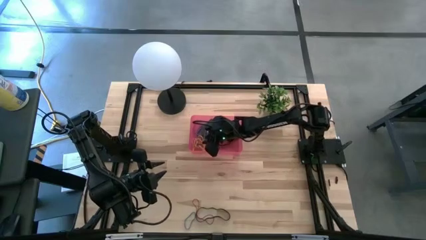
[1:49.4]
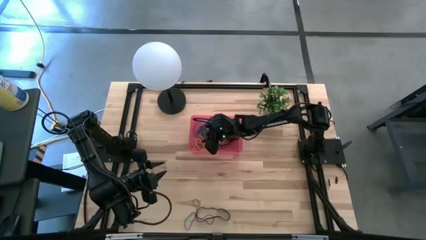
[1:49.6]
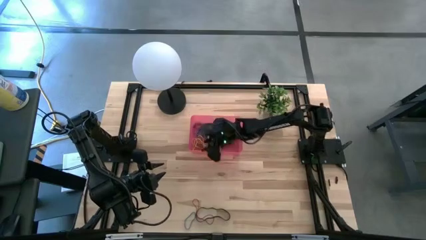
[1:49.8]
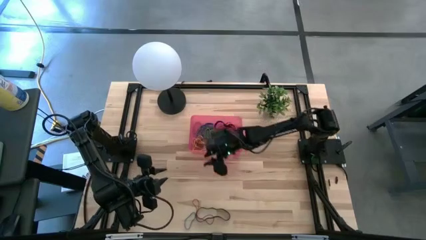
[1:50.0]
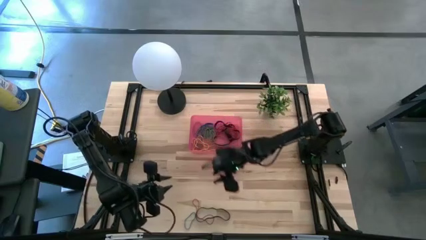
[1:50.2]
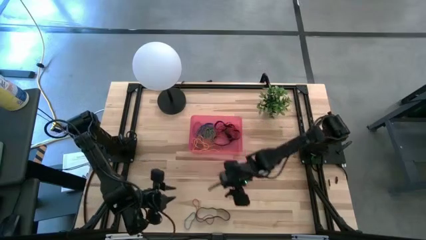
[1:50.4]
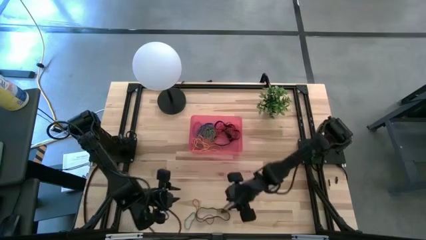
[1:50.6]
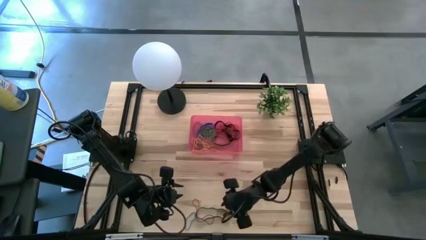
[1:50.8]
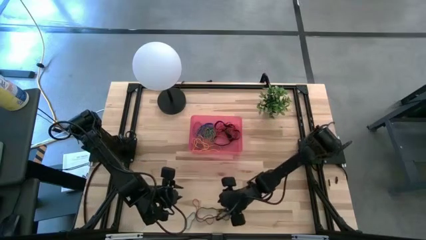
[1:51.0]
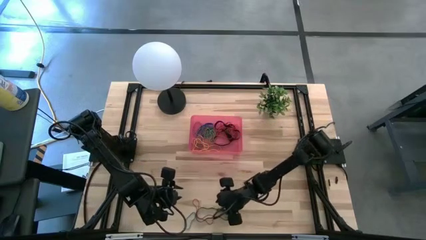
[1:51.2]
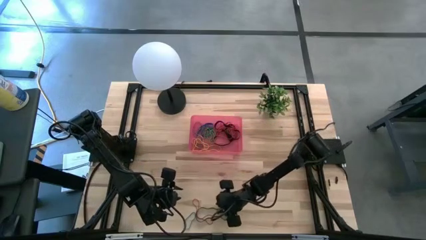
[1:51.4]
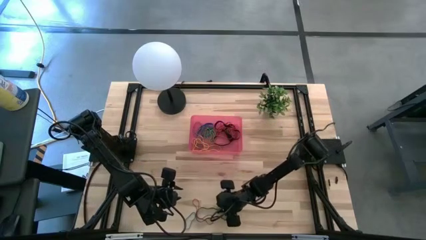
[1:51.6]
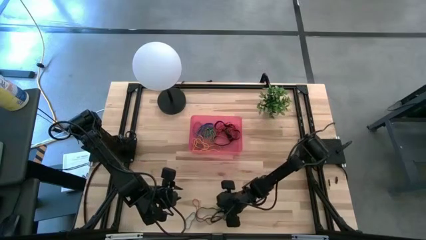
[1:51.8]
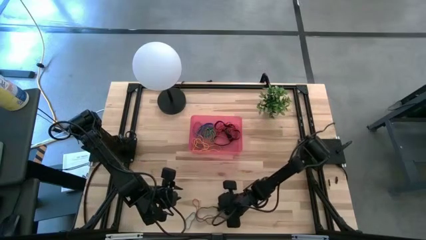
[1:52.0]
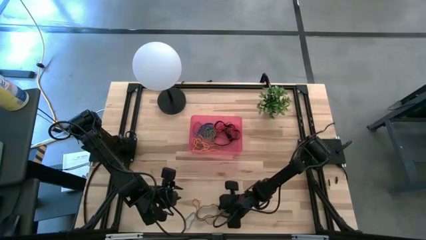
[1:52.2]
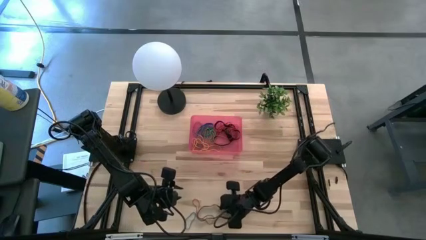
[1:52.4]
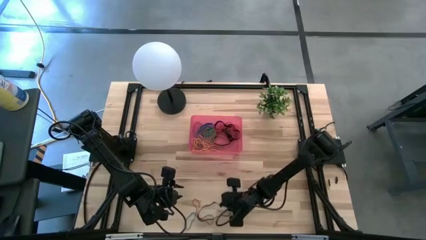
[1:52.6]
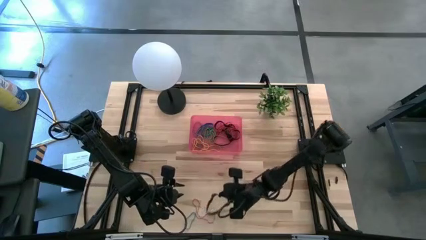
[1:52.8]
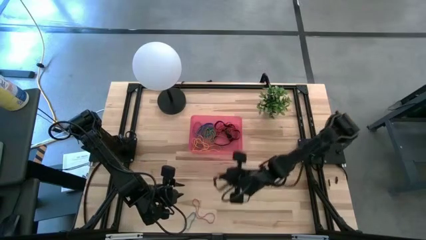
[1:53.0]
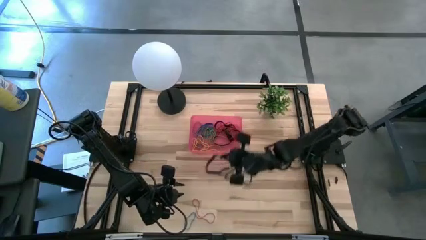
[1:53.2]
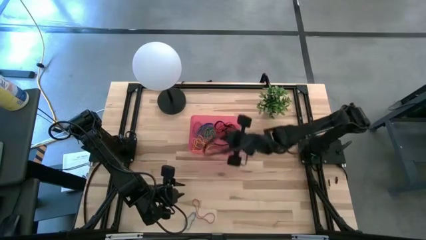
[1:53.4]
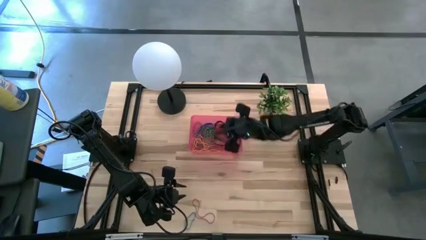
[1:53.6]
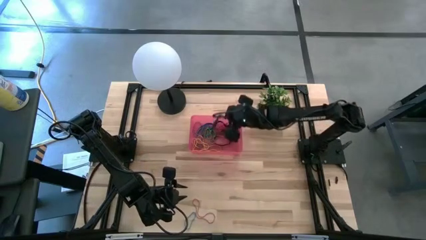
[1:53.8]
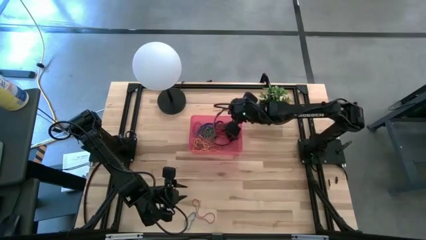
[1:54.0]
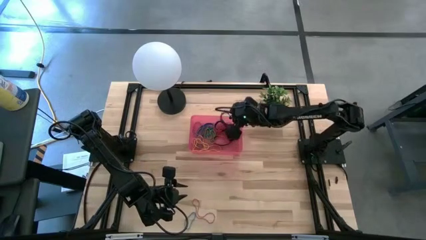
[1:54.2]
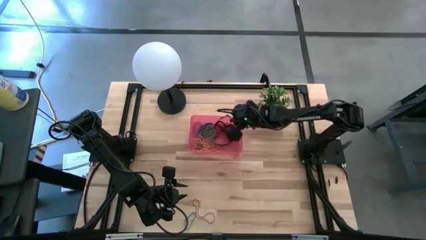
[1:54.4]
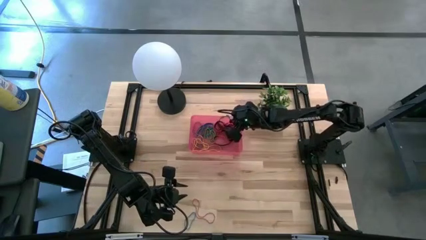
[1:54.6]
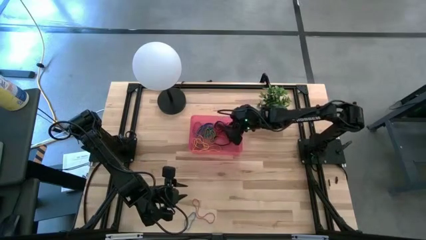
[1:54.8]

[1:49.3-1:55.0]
Task: Pick and place rubber bands into bin
Put the black rubber band into the red bin

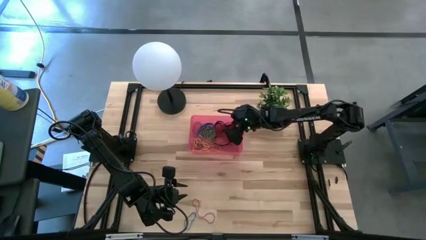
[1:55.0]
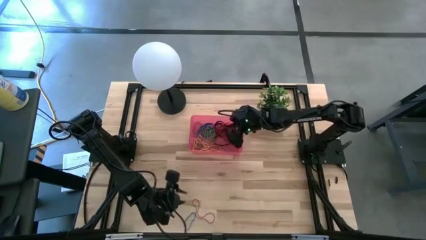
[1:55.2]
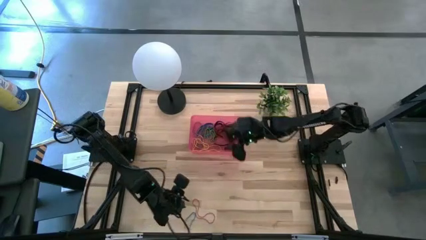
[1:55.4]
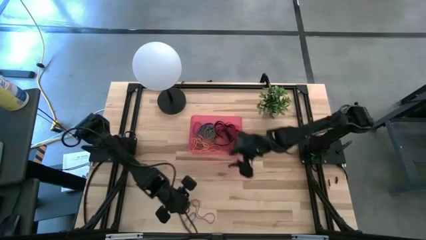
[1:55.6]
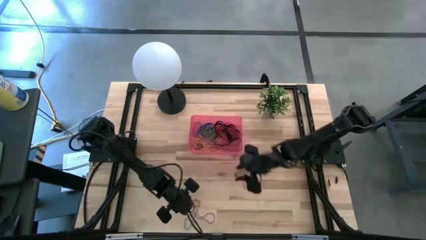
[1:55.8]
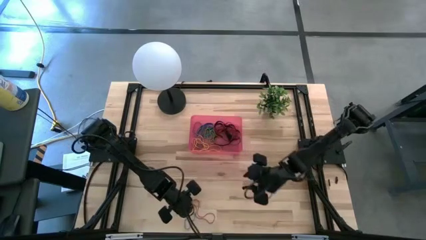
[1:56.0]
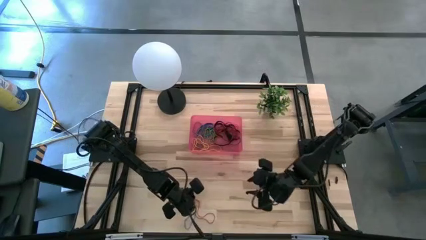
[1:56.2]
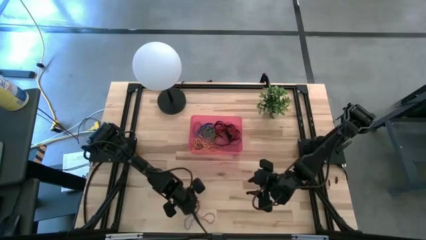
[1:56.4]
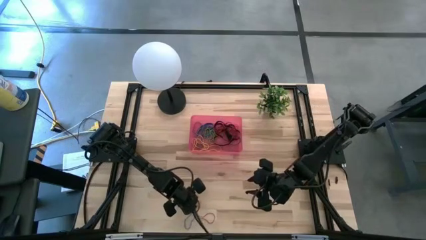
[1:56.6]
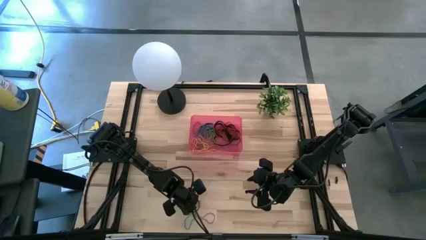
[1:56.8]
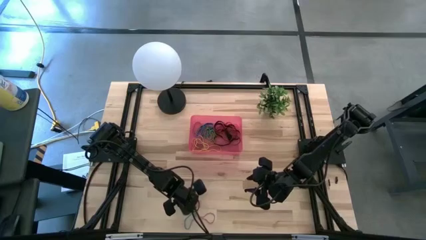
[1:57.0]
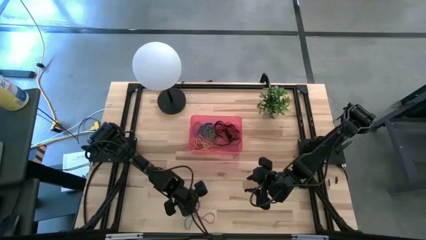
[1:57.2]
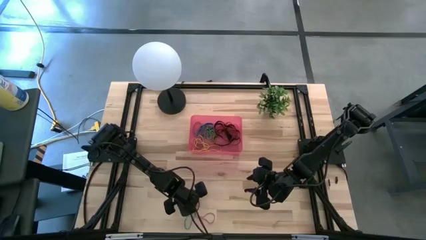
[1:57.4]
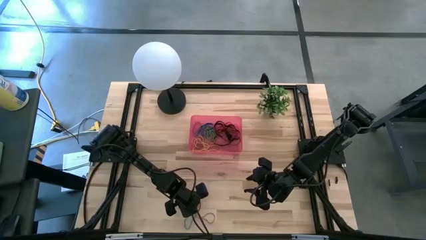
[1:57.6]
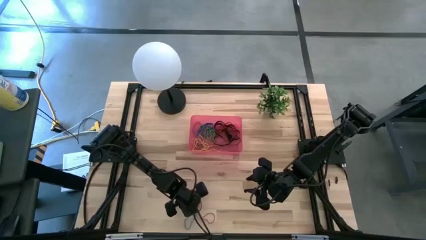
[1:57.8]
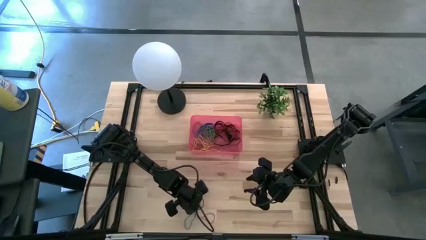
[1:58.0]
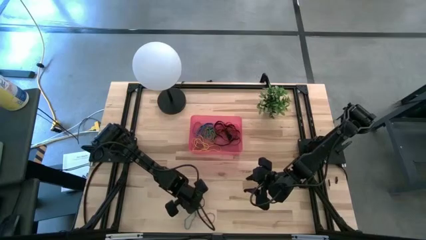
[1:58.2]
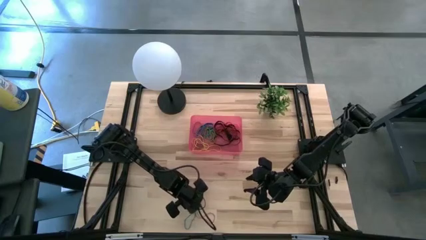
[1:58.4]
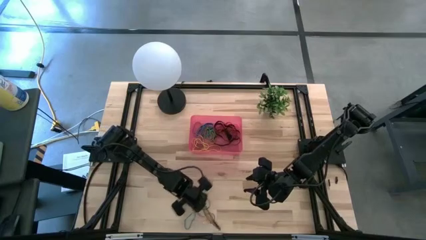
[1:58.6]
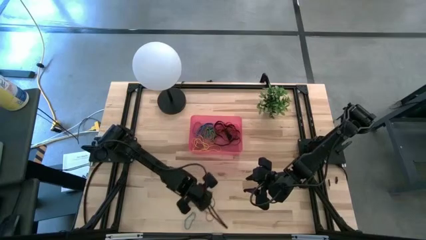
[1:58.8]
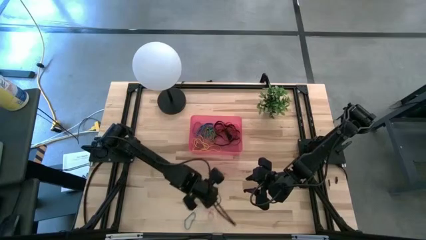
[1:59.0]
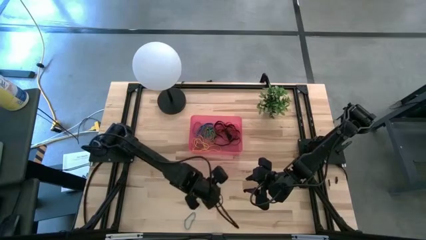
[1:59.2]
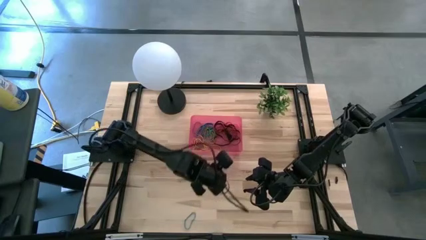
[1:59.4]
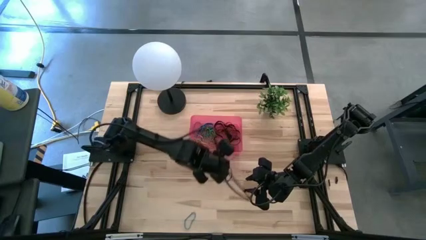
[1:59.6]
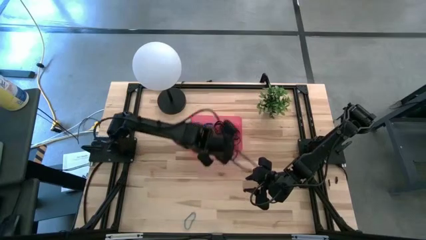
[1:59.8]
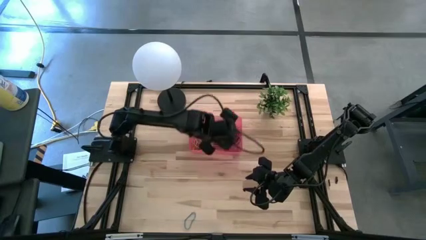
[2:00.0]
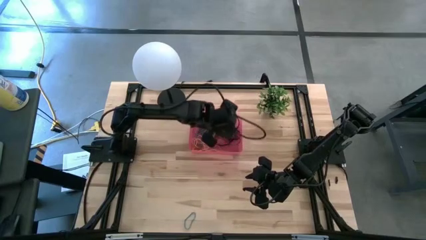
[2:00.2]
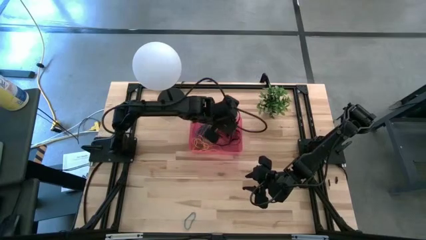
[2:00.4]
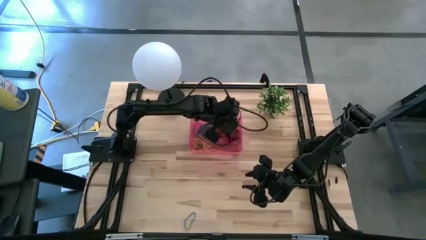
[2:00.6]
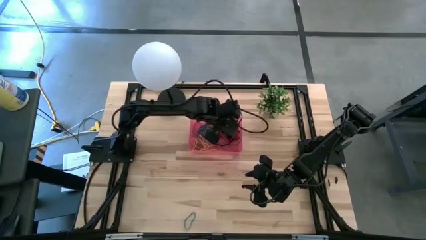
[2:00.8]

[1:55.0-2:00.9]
Put the red rubber band into the red bin

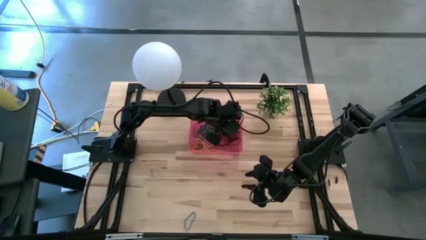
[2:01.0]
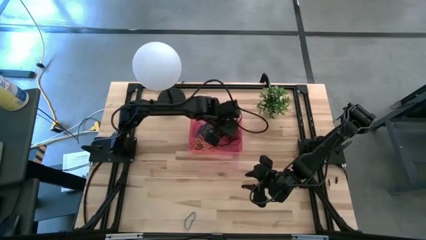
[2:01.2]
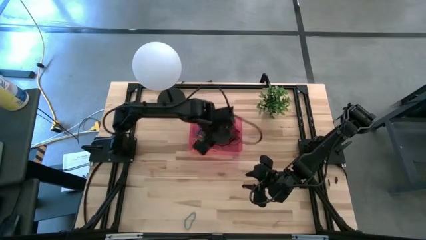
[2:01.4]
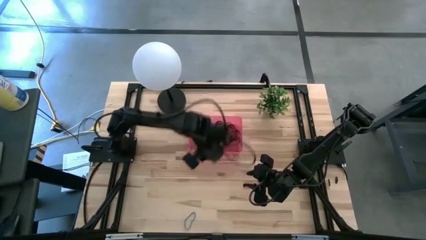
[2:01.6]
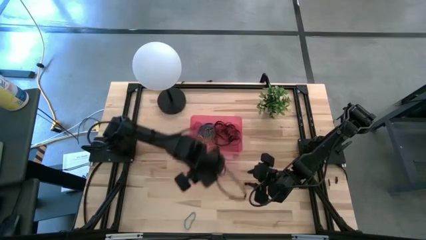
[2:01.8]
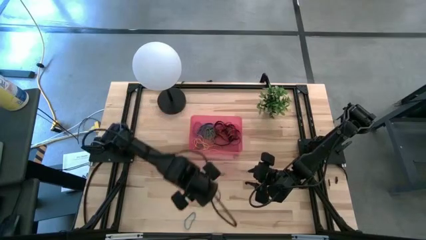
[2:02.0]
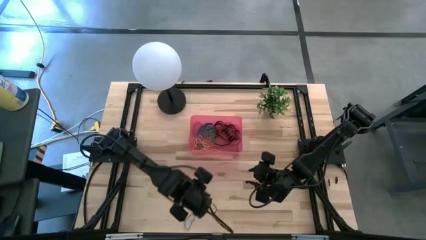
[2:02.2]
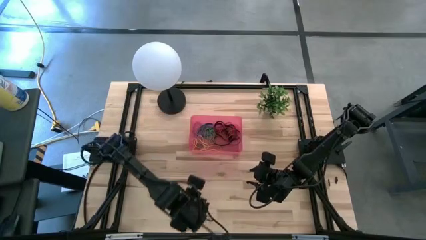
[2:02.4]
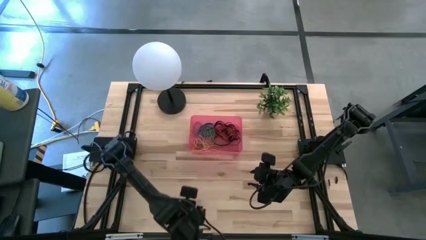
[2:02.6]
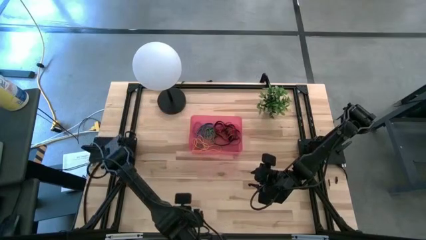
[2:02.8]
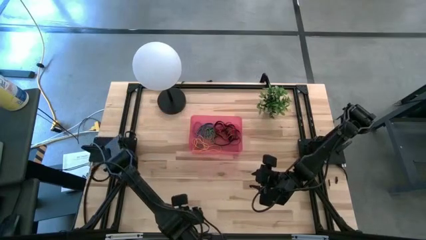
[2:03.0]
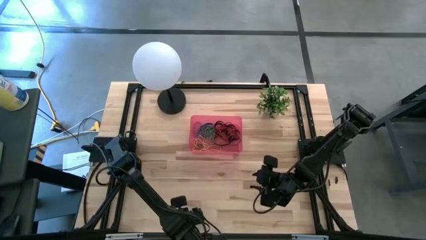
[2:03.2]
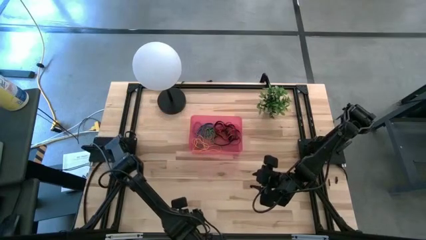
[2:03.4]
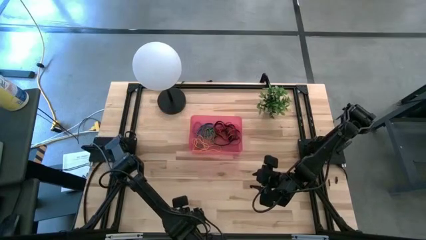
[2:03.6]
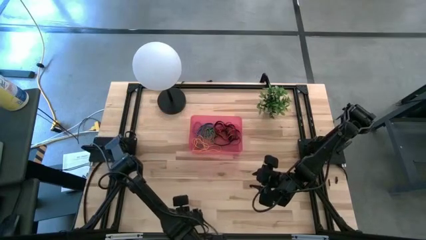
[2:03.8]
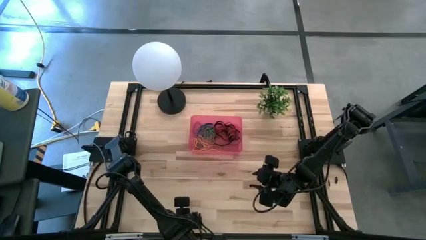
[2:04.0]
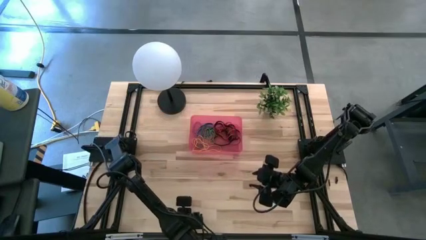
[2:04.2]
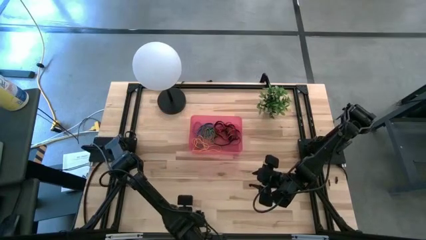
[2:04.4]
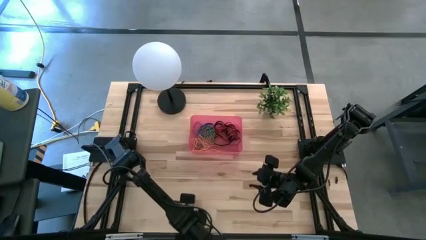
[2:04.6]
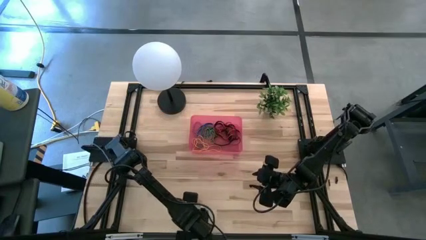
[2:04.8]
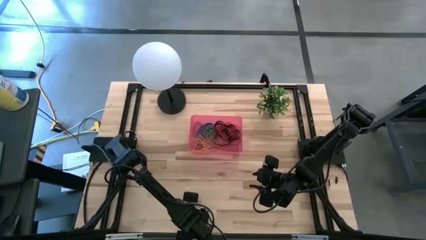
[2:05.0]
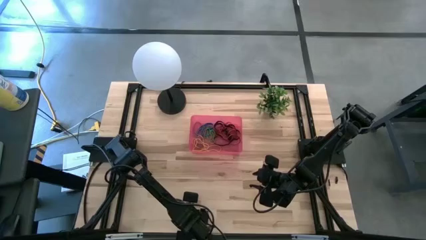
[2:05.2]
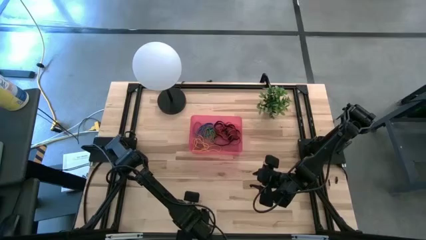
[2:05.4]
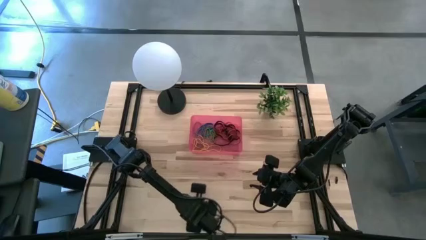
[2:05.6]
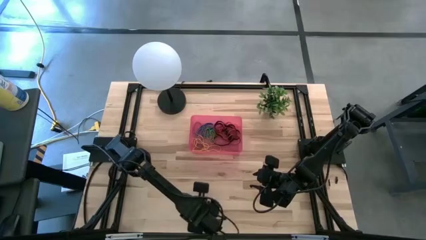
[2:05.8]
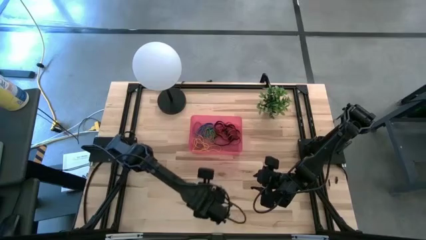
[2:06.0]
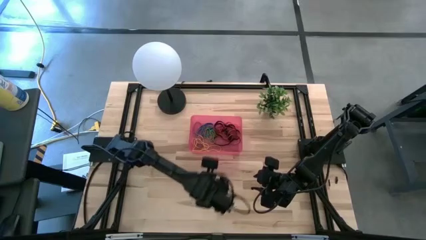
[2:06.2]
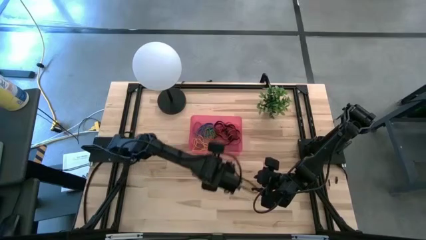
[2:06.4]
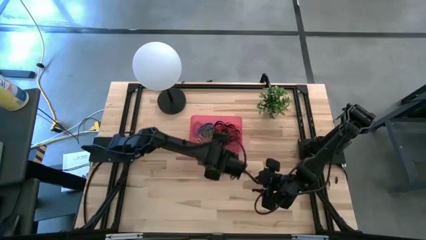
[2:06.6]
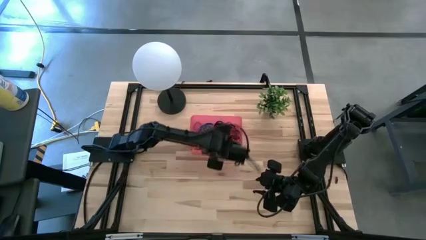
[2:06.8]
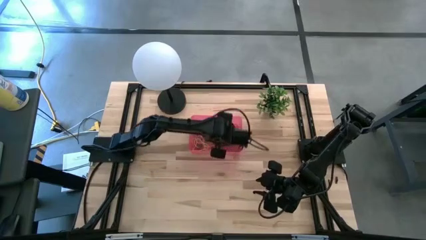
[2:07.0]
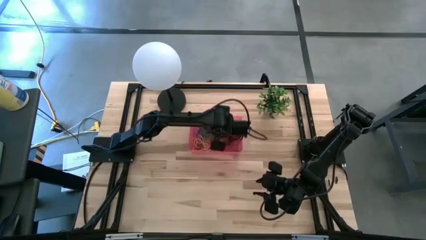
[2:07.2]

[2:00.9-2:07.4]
Put the blue rubber band into the red bin
